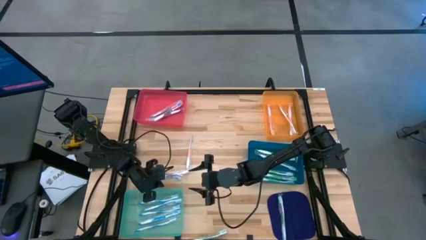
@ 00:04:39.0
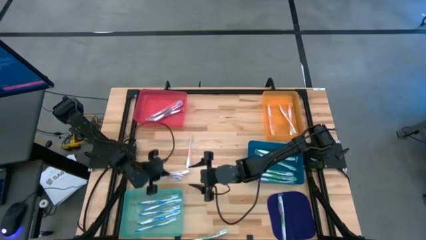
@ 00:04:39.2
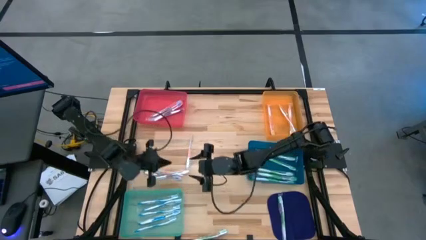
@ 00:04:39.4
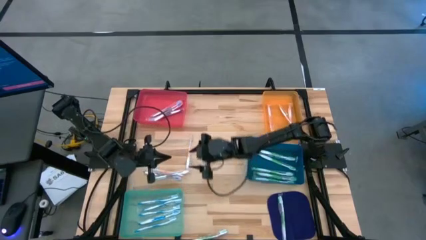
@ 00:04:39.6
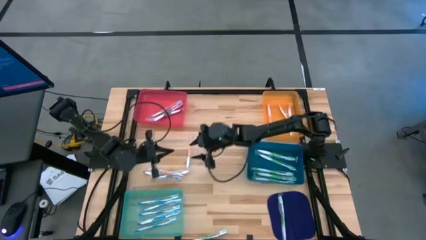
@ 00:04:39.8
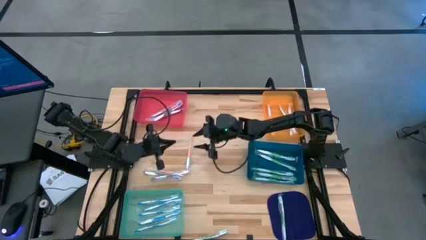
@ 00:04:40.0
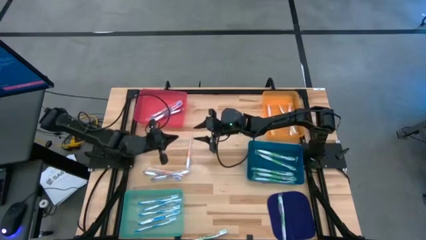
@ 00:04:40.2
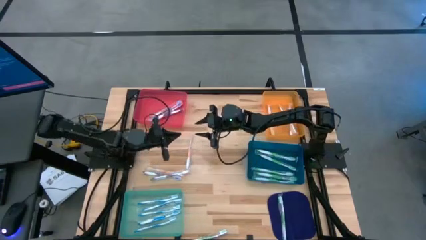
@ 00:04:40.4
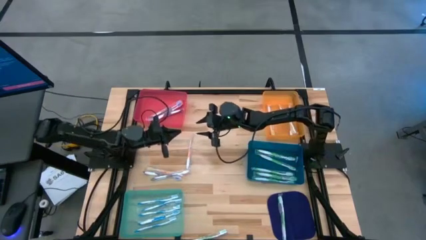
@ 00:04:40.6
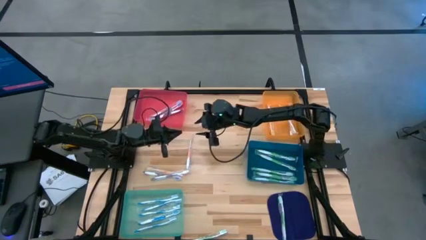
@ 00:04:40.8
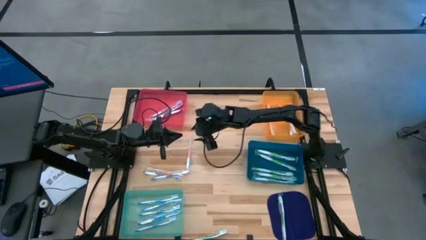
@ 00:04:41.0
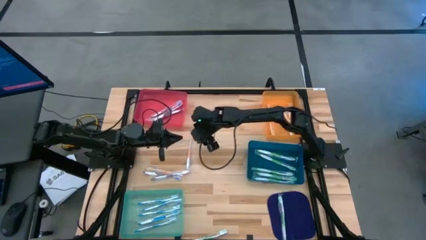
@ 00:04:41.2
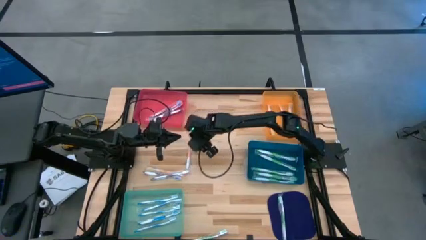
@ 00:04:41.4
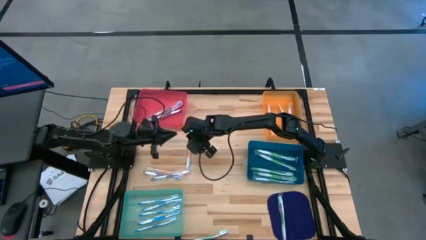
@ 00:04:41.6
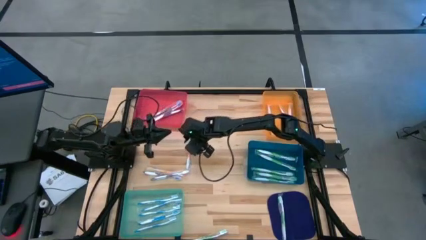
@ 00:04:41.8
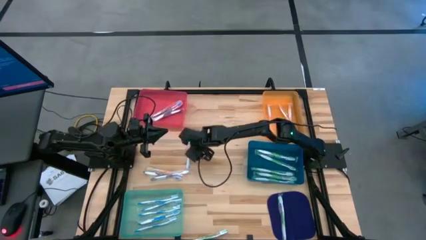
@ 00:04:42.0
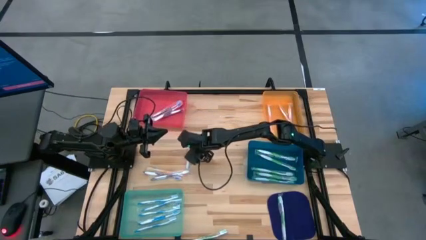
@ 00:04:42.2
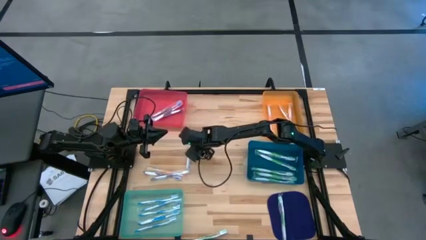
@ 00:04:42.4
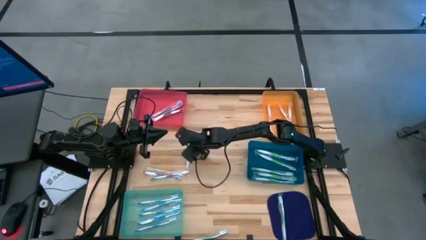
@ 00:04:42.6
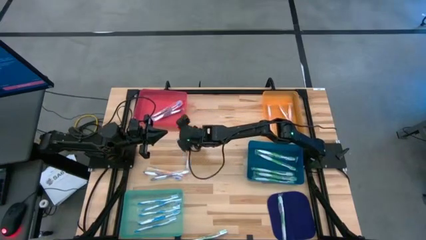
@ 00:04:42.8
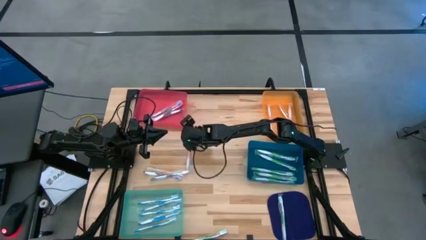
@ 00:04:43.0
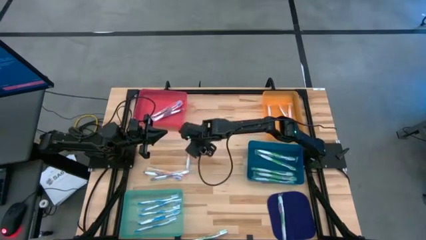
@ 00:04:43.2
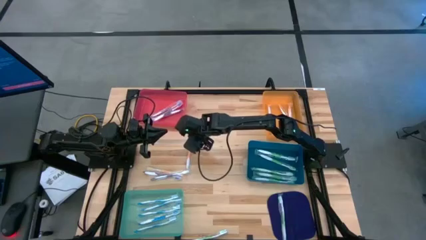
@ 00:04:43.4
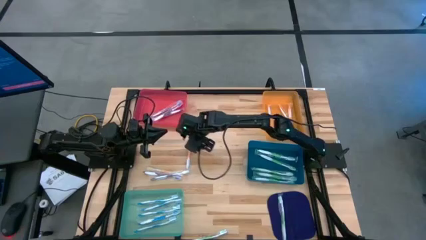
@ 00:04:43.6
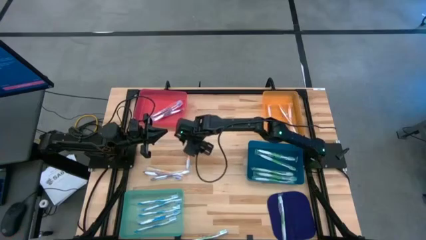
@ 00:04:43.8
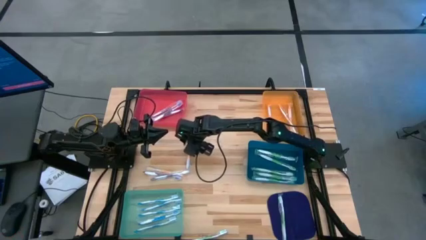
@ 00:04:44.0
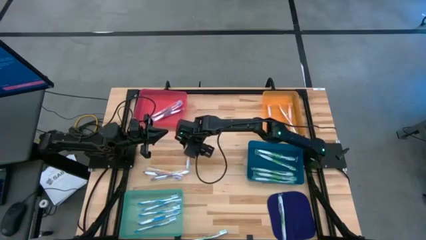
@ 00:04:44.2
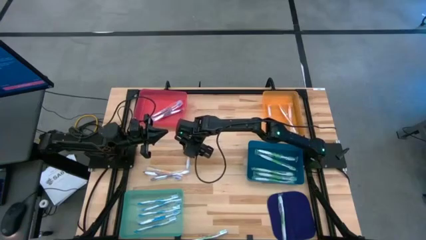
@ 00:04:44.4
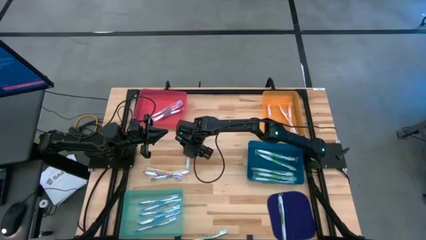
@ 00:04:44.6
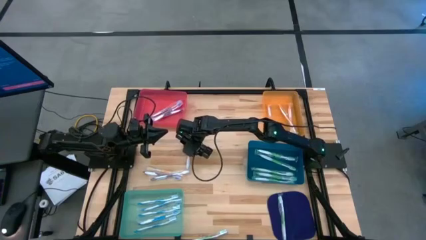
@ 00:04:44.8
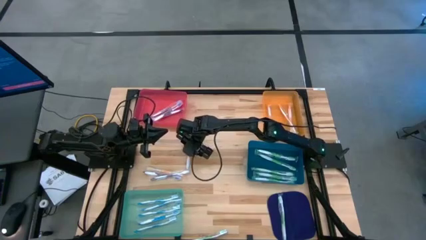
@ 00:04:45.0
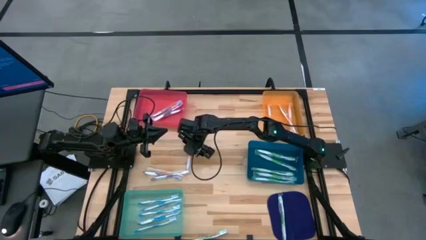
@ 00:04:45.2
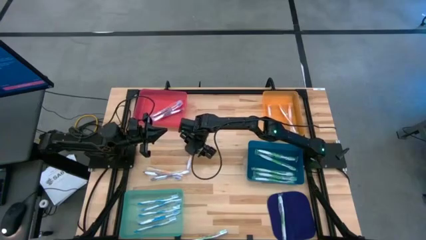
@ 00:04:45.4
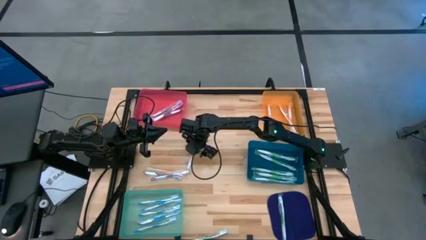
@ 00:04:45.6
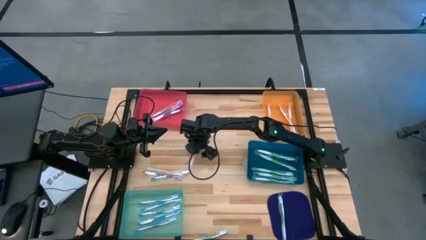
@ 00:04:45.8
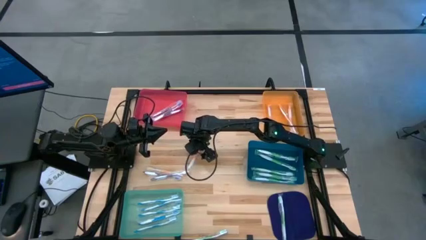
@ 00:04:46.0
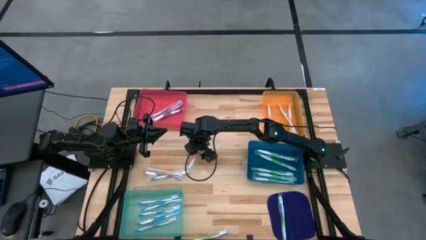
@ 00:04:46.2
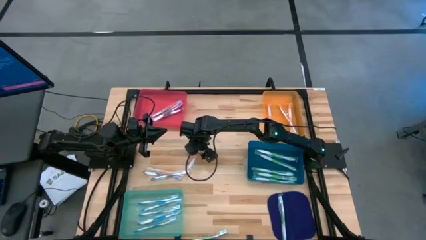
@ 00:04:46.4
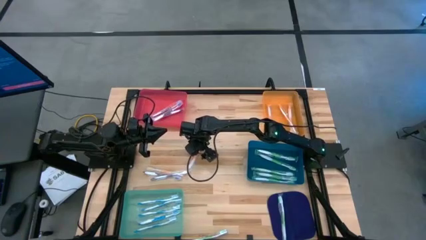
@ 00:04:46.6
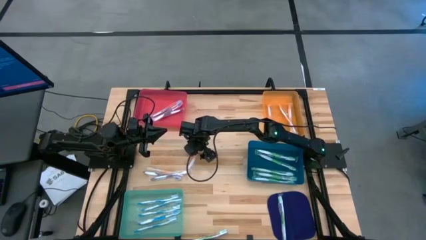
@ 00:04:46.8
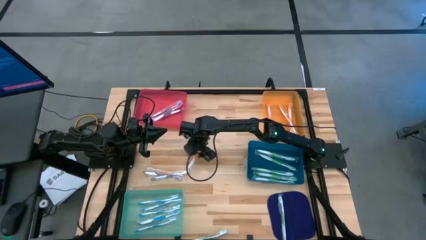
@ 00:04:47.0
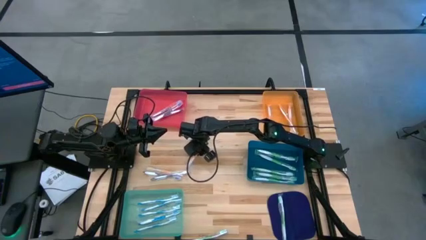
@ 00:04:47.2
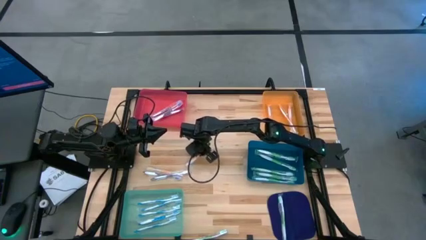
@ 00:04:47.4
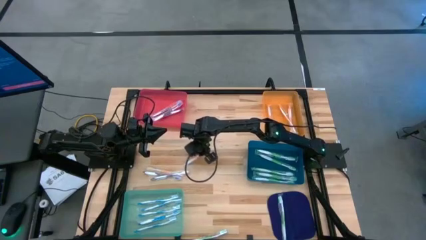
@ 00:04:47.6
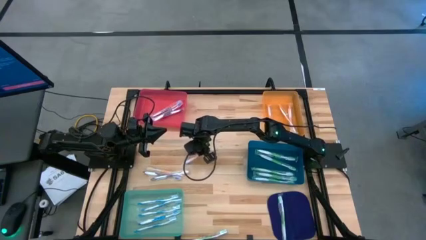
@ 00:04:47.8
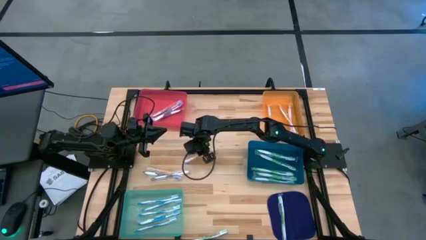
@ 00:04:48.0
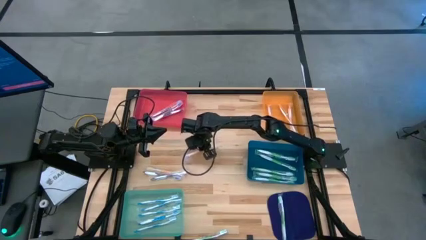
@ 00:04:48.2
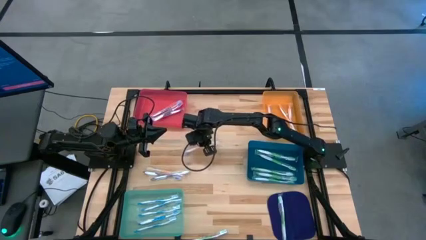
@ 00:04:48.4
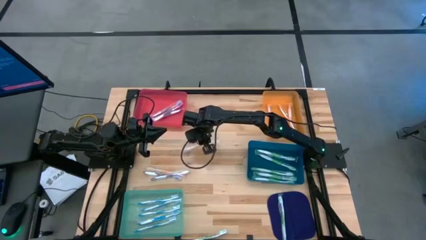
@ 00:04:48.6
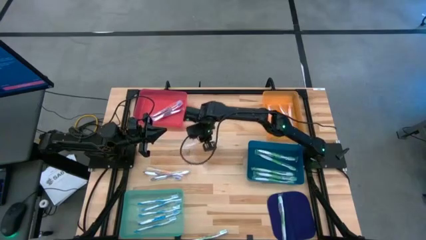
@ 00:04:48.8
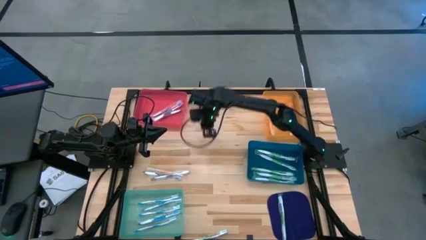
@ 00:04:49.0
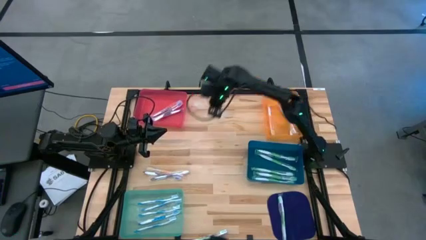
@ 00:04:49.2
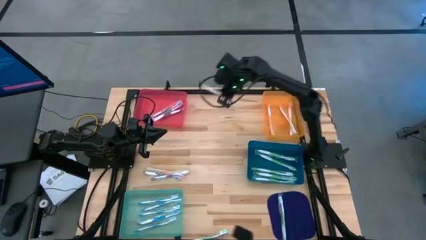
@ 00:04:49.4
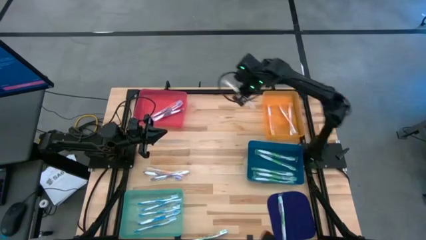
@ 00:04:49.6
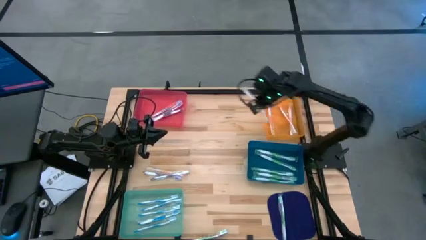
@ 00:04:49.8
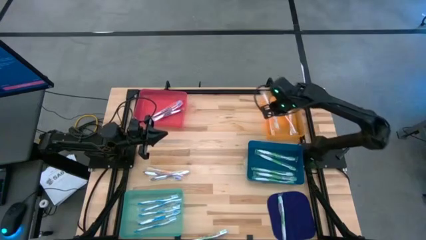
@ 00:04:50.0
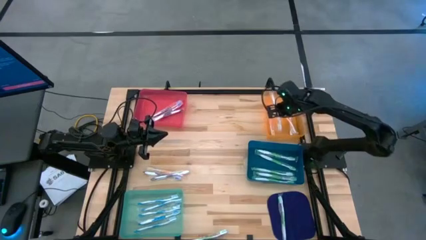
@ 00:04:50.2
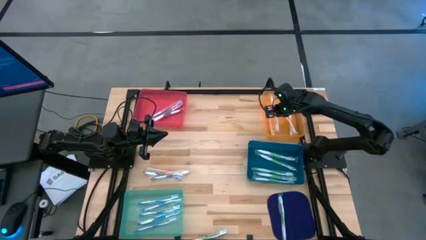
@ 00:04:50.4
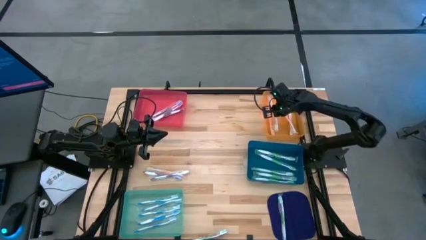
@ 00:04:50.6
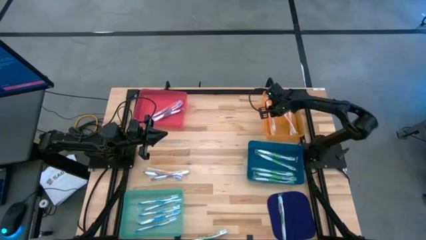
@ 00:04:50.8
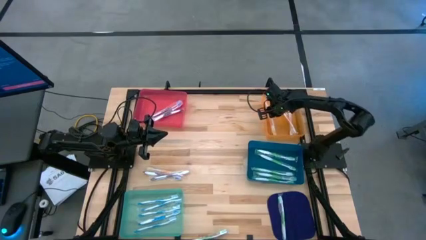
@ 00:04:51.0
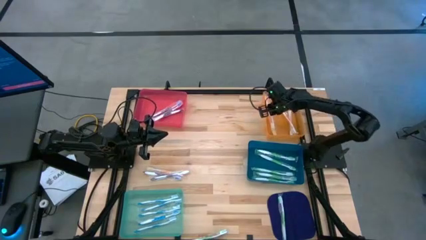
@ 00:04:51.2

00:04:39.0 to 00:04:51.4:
Task: Pick & Place Toothbrushes
Put the orange toothbrush into the orange bin

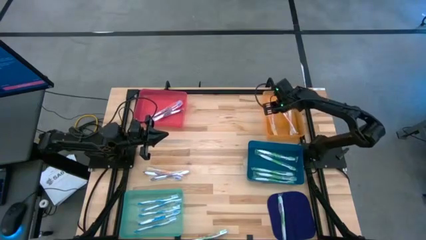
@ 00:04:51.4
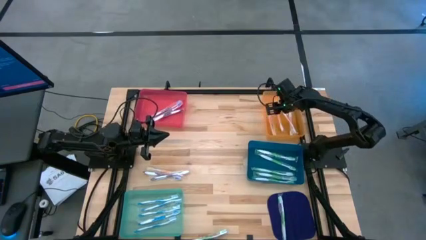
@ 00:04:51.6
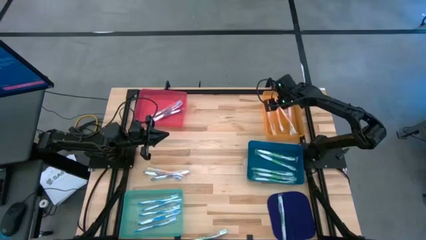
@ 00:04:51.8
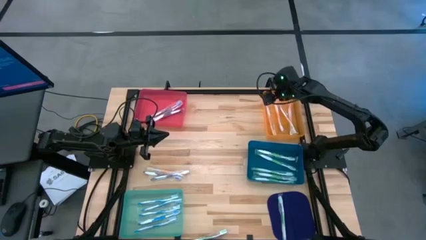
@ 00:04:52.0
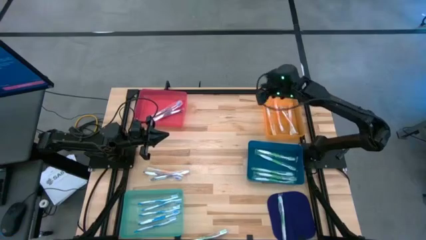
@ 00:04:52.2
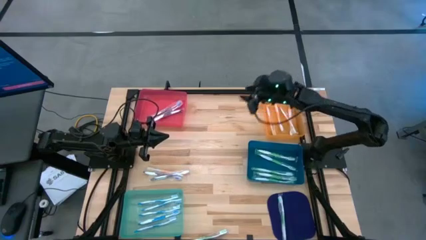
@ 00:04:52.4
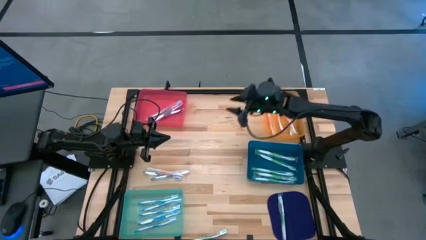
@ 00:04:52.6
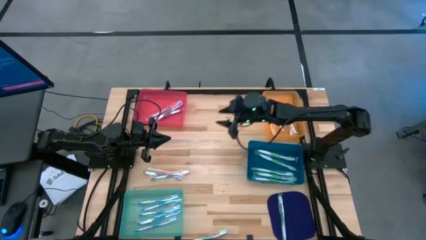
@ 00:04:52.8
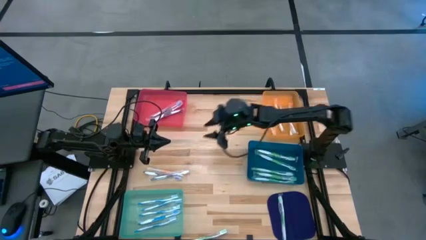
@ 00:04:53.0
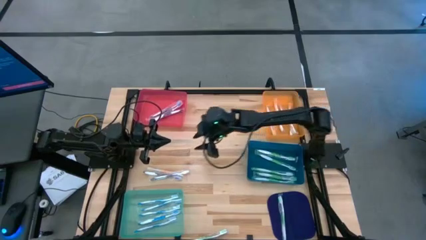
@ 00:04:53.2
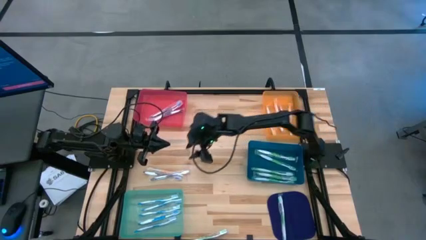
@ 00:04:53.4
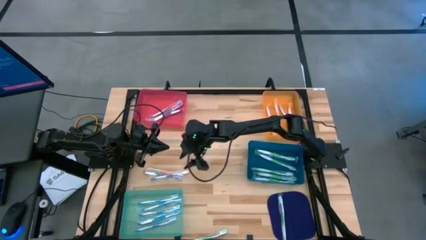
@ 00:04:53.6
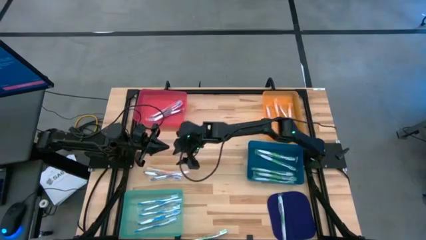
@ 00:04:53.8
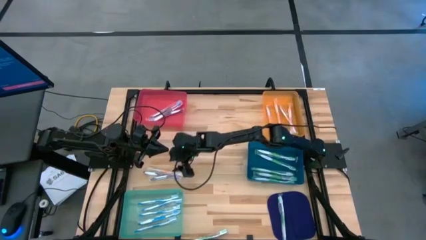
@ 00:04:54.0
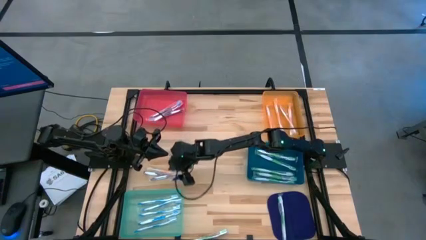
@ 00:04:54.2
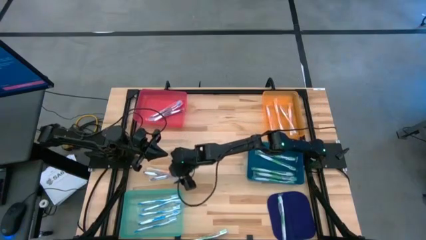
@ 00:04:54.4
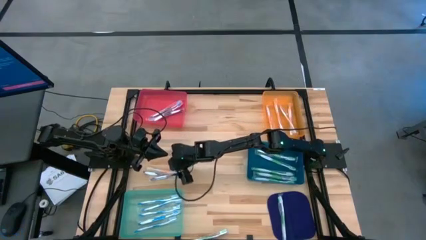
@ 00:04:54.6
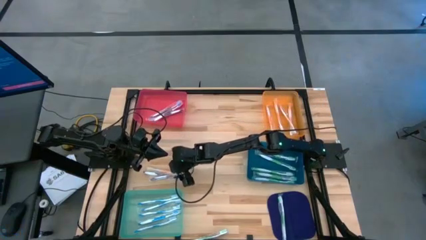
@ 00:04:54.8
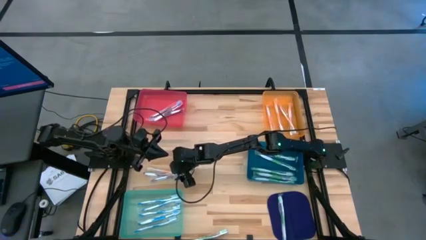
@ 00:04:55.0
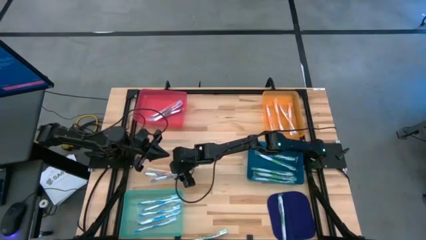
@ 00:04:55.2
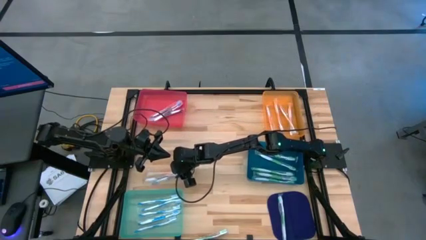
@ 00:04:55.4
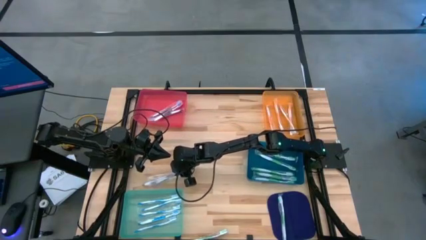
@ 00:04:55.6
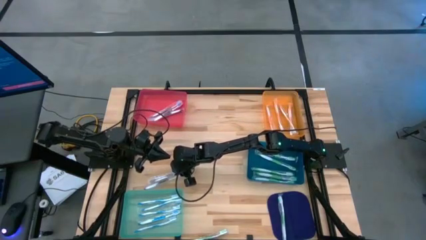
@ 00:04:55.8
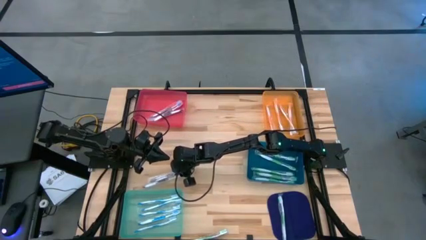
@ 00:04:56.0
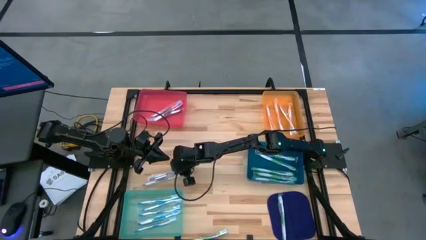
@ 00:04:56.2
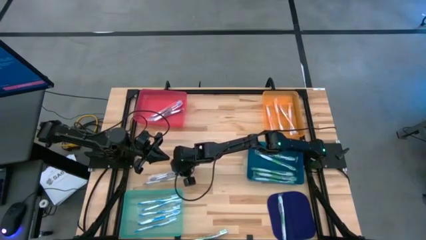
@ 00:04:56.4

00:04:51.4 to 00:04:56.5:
Put the violet toothbrush into the pink bin
